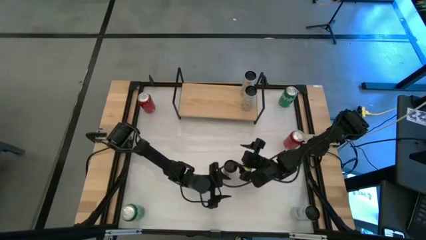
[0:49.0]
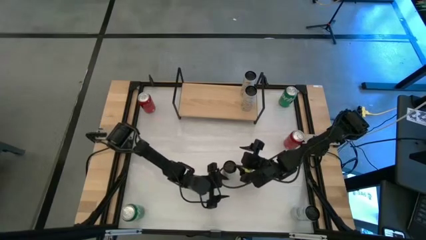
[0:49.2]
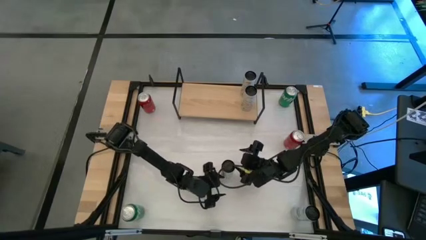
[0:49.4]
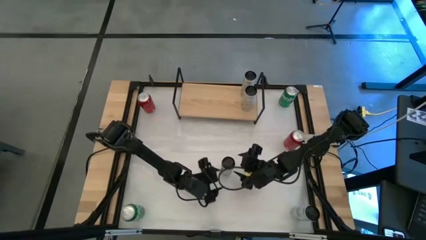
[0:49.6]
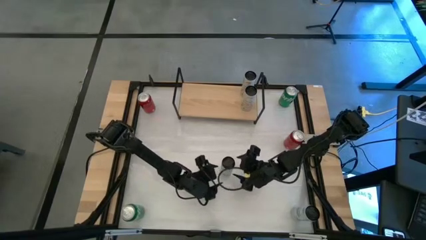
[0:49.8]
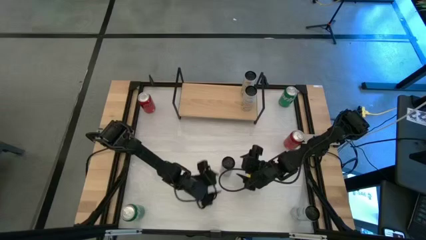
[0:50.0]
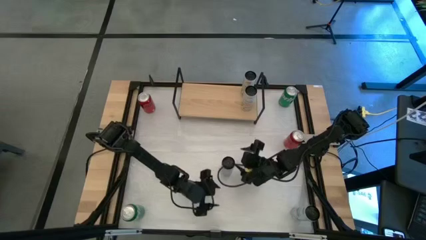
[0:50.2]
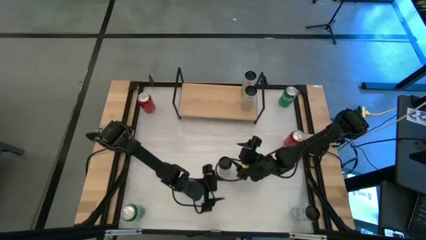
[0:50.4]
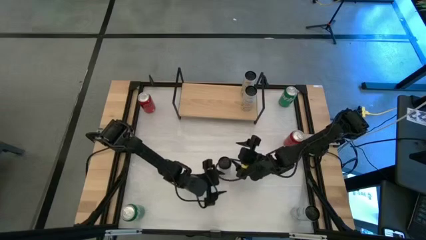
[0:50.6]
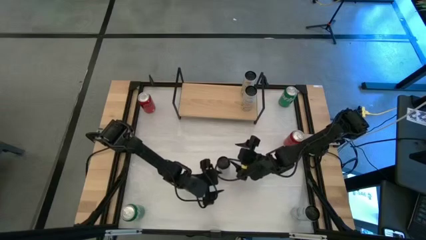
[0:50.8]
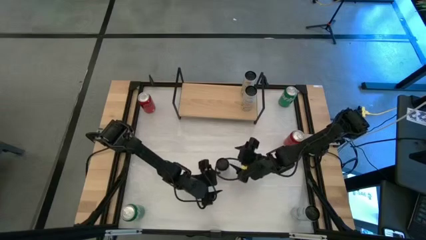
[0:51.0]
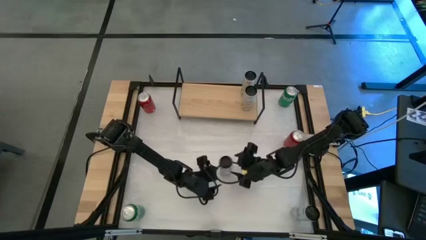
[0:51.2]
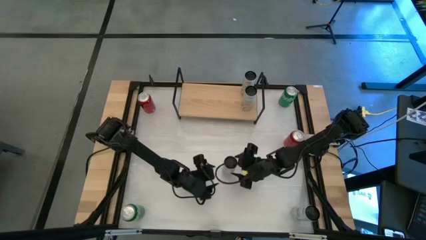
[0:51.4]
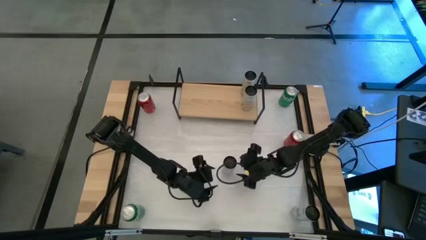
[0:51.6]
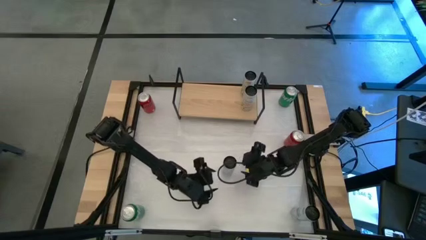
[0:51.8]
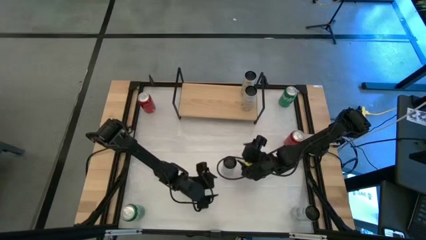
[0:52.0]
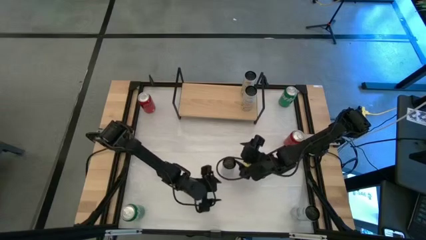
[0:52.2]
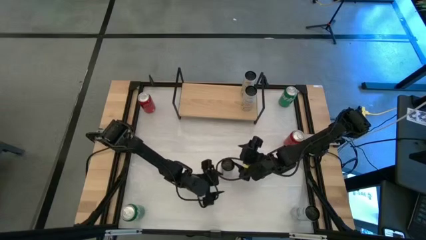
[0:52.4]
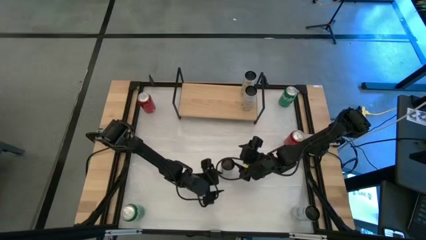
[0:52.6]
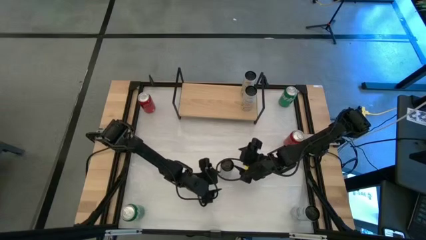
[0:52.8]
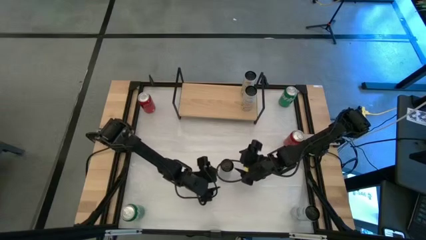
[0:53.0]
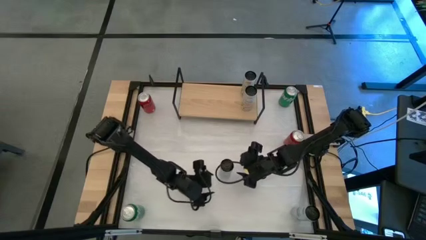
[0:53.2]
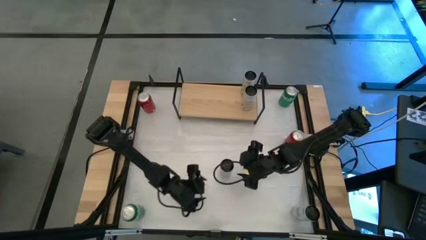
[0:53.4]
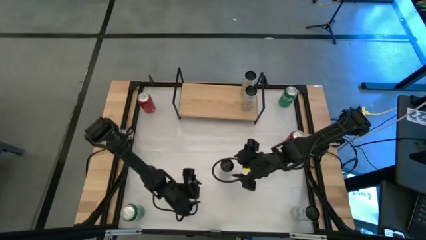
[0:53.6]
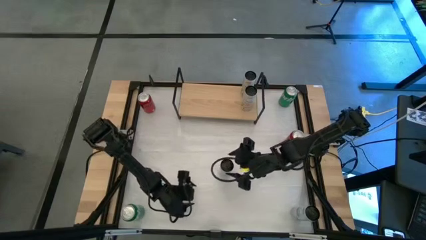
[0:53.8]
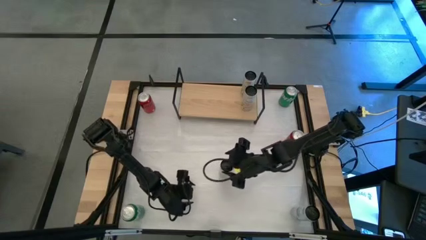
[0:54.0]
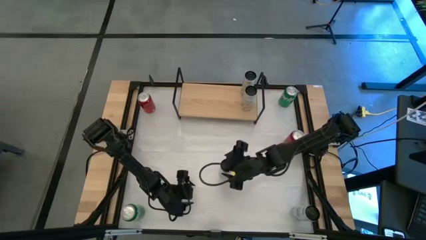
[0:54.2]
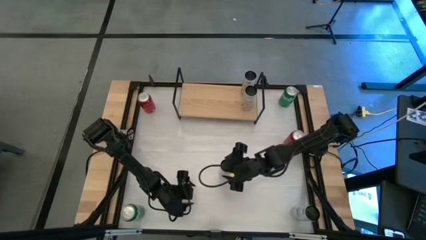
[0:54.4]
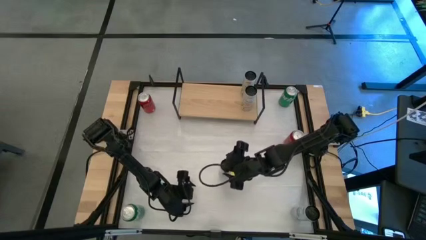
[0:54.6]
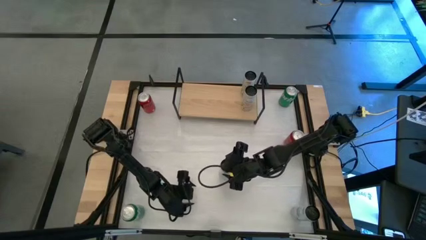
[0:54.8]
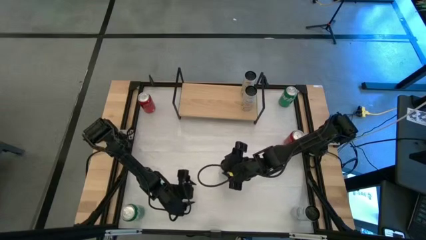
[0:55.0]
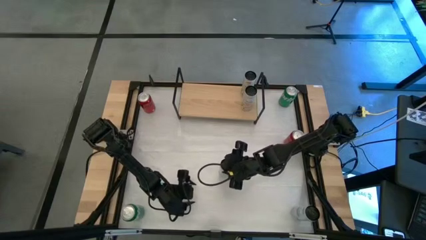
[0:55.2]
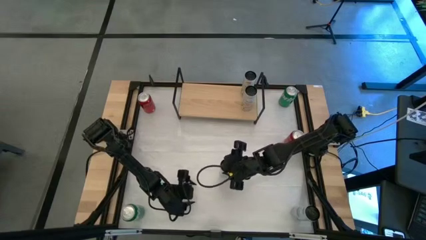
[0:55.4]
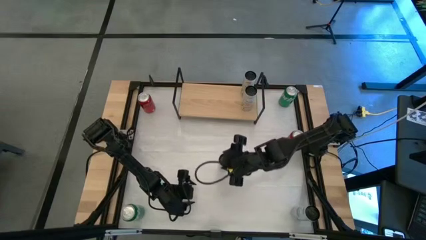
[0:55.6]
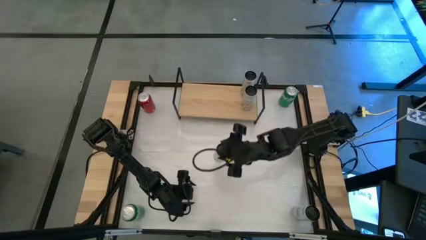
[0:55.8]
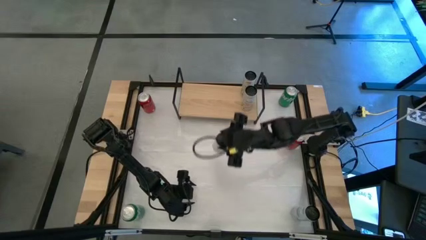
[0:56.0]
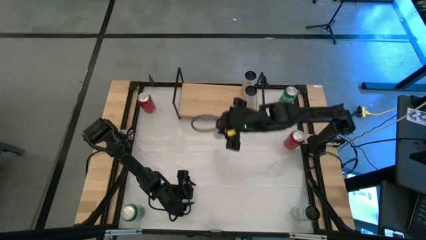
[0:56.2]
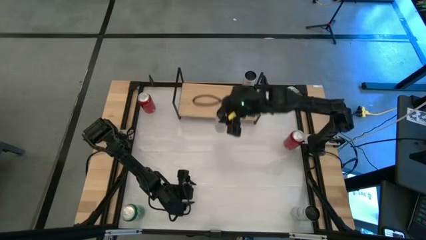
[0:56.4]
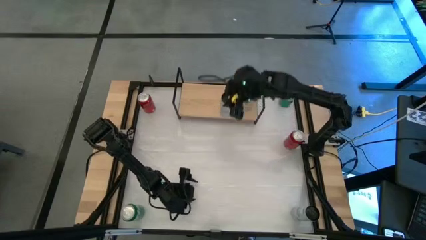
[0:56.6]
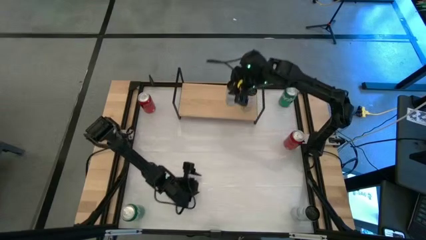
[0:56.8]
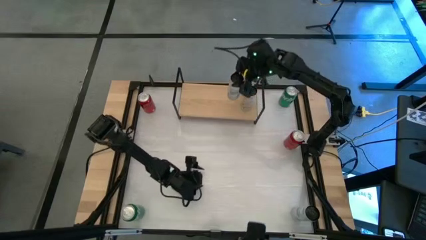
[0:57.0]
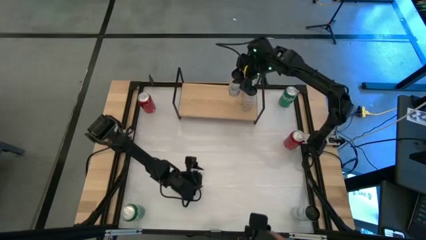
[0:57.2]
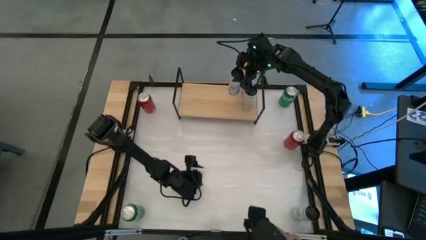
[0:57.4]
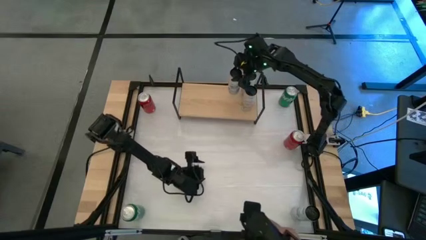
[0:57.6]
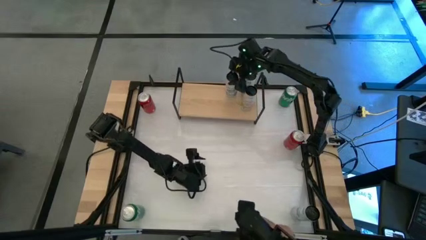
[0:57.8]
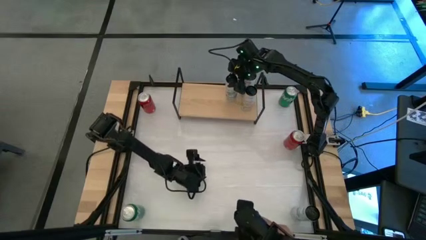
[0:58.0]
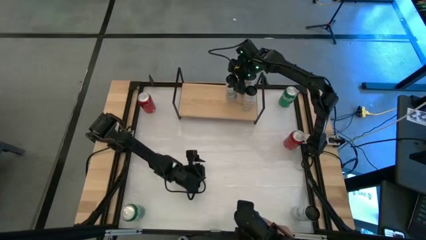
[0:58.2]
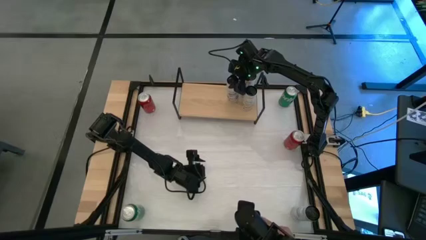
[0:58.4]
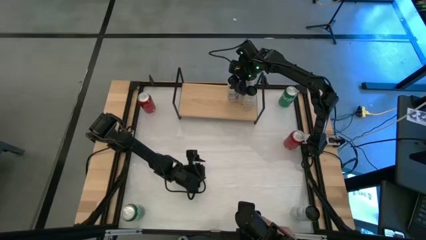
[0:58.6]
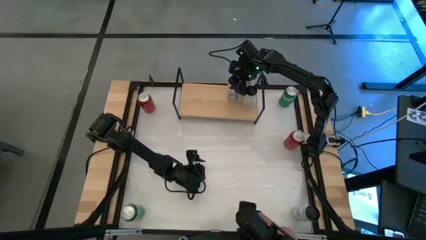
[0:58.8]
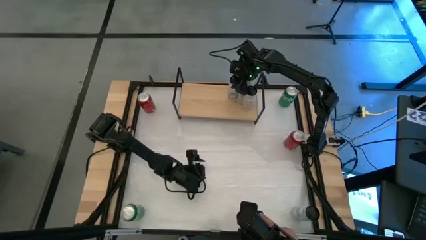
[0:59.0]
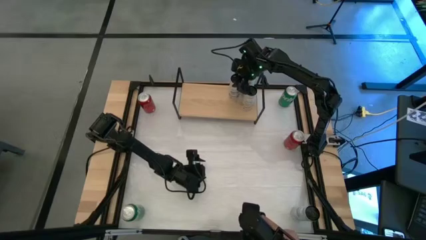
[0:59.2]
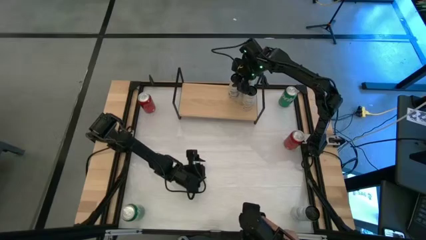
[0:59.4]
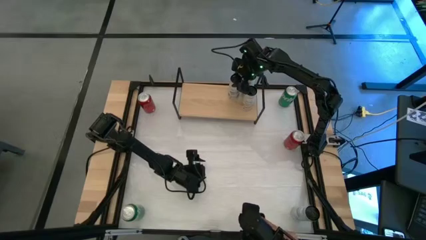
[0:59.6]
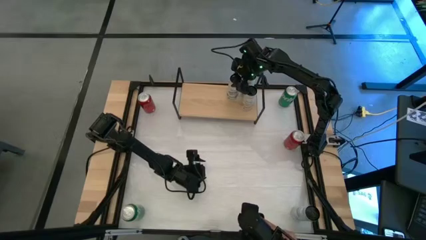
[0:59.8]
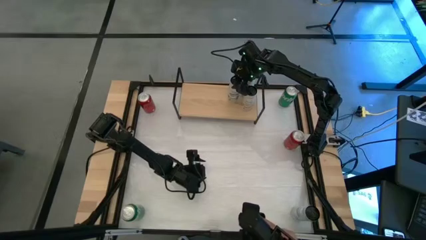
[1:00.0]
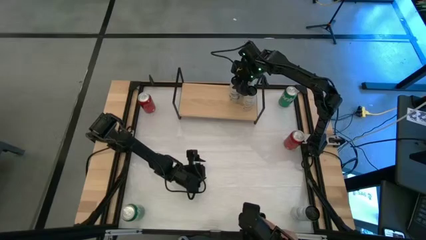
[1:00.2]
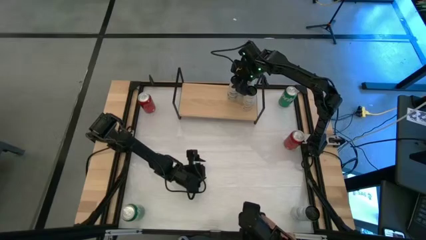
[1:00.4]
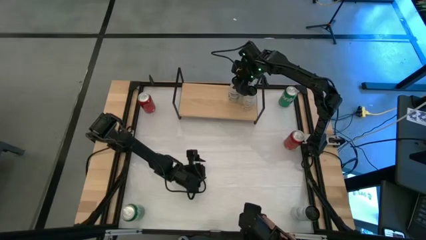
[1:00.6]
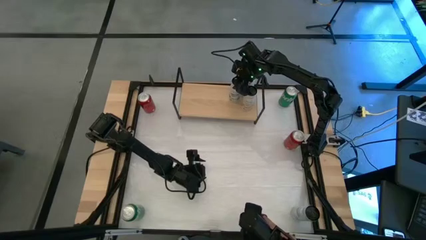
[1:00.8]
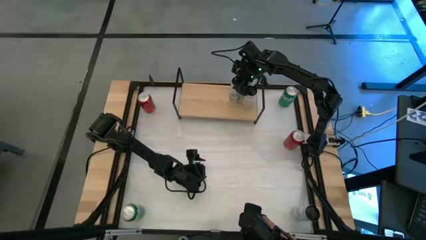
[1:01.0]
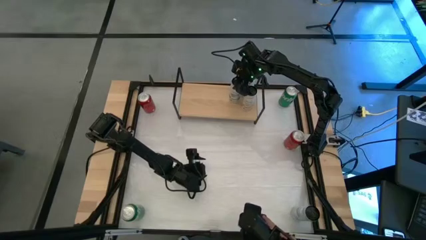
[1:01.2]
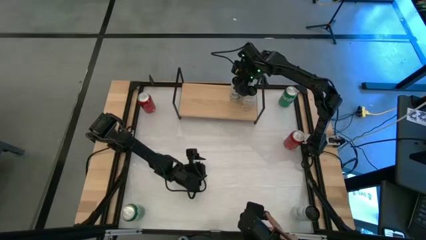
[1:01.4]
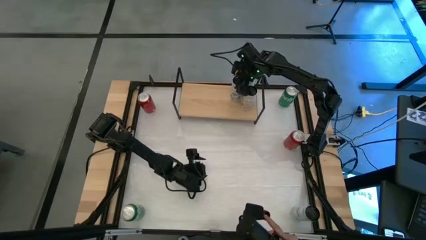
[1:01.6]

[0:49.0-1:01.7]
Task: Place canned beverage on shelf
Put the left white blue soda can on the shelf

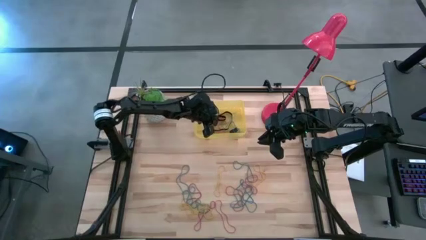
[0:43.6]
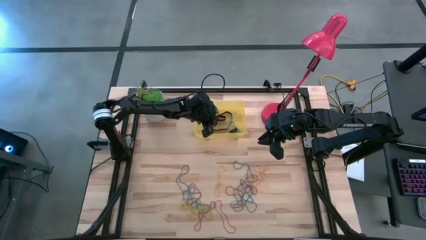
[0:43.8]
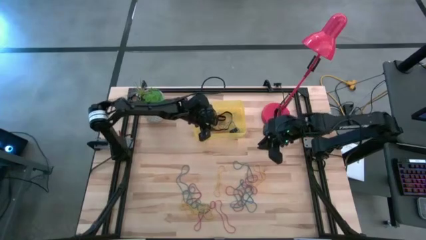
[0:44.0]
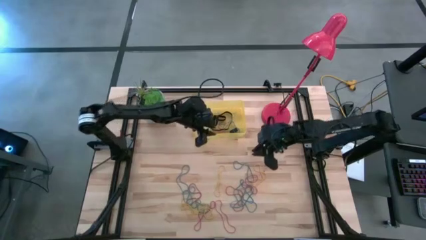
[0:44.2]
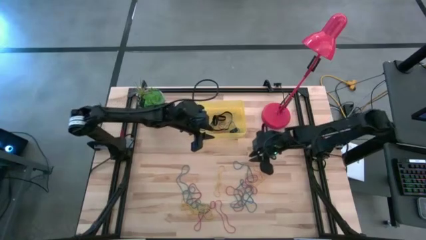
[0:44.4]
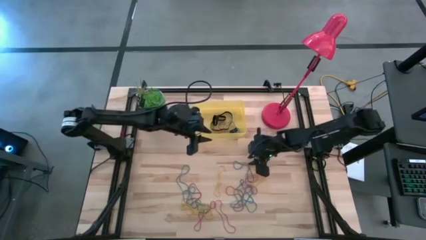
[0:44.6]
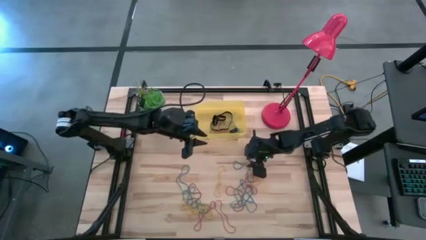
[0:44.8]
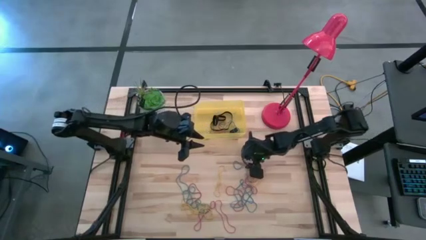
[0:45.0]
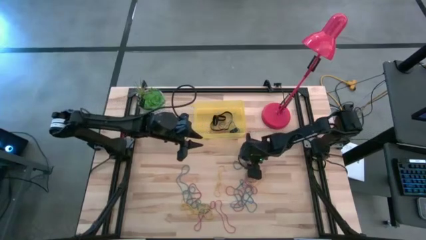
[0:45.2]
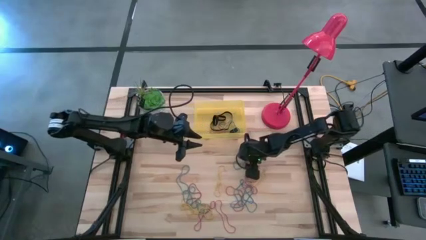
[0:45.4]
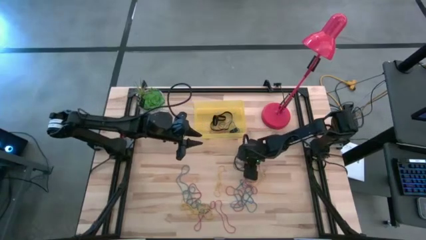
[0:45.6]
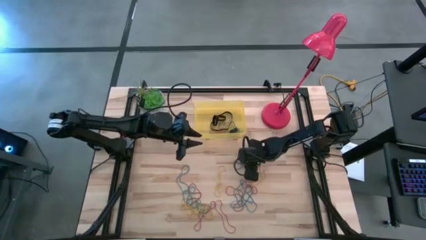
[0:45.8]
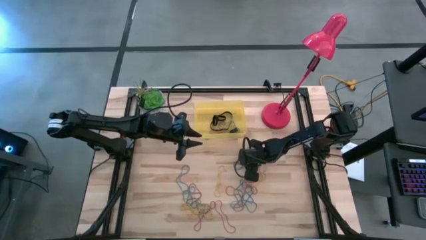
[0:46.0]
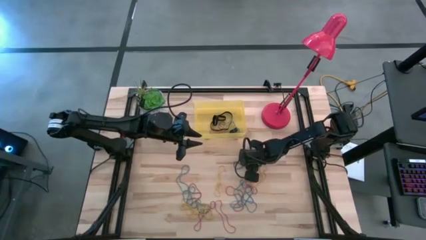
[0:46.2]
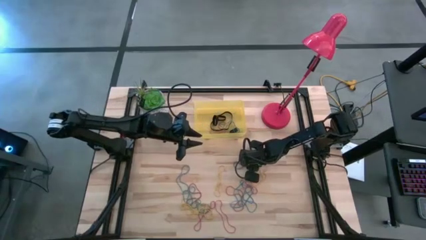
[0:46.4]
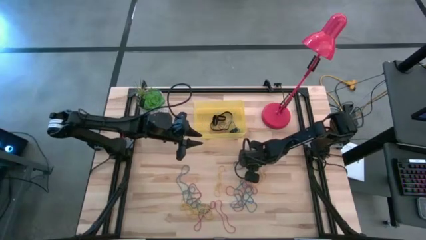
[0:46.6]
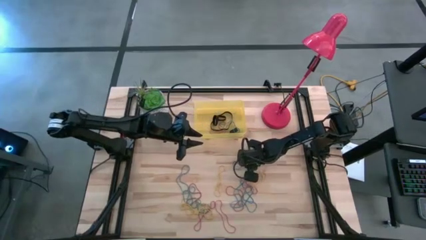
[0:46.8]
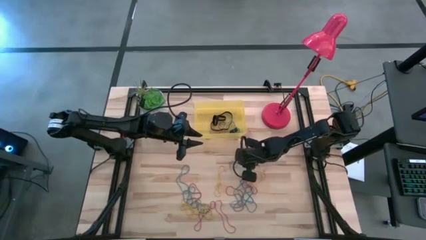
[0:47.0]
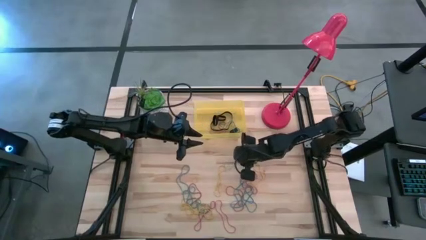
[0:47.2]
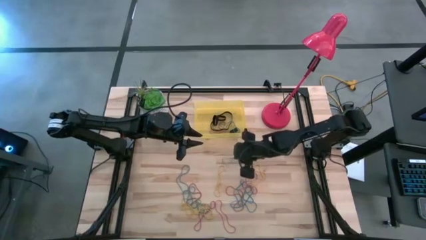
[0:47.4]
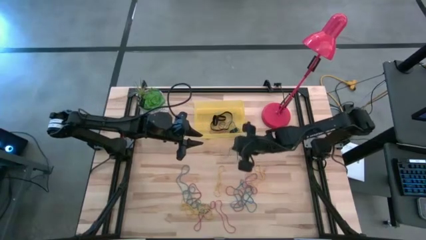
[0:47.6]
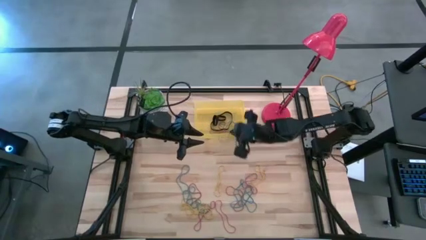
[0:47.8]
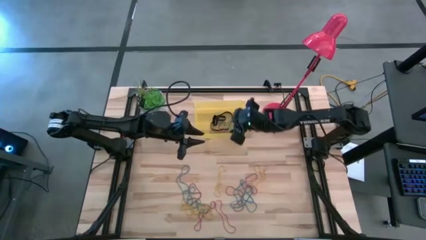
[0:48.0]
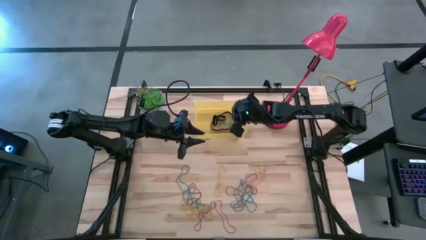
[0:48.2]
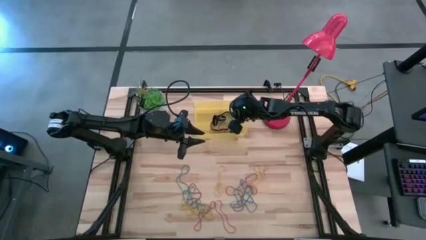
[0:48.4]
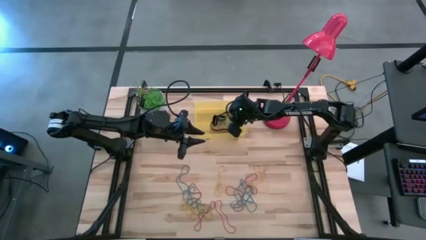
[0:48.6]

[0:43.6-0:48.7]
Task: Pick and place rubber bands into bin
Put the blue rubber band into the yellow bin
